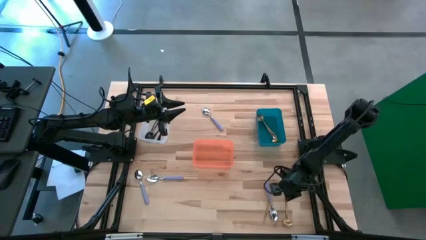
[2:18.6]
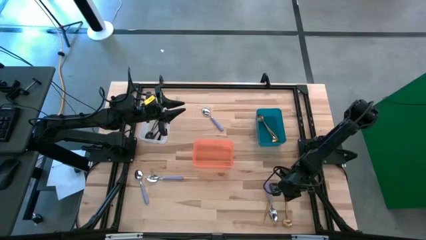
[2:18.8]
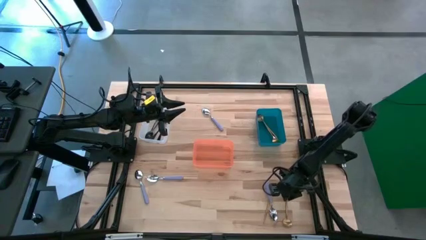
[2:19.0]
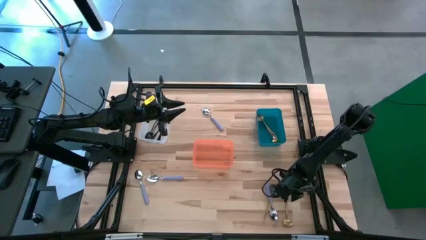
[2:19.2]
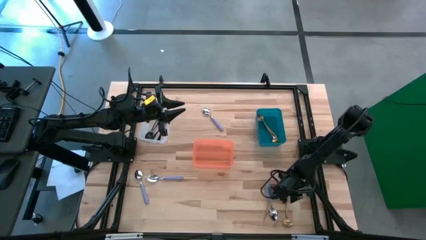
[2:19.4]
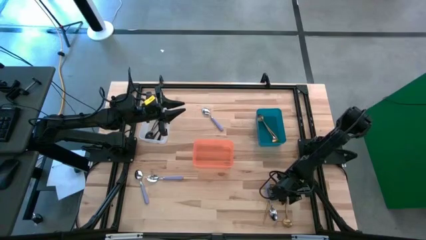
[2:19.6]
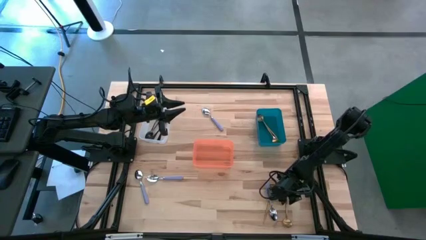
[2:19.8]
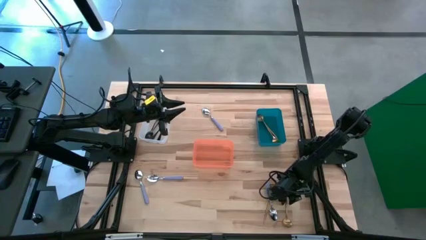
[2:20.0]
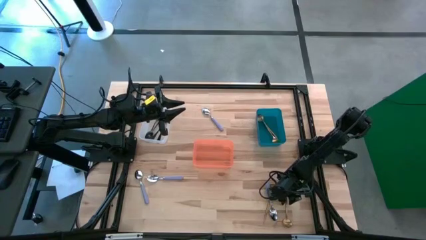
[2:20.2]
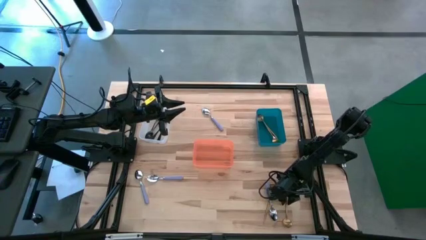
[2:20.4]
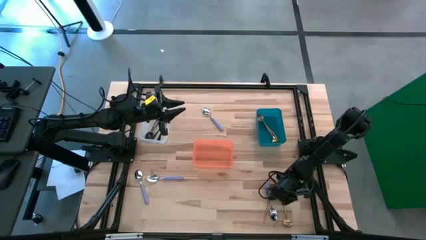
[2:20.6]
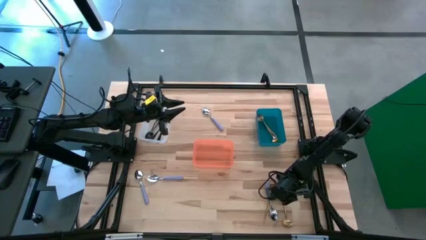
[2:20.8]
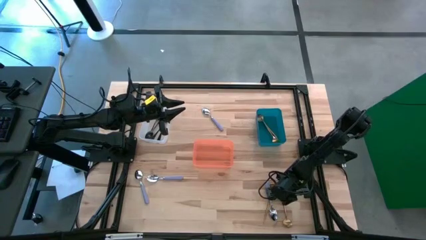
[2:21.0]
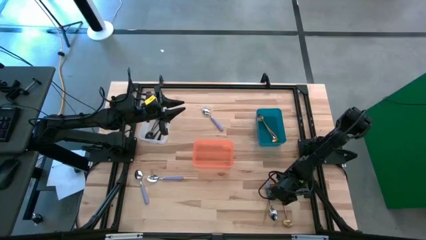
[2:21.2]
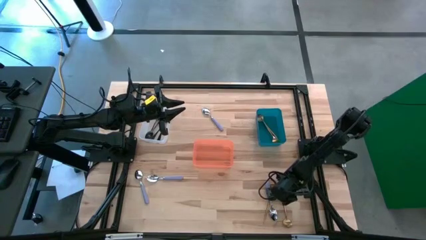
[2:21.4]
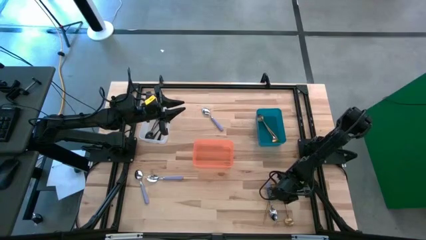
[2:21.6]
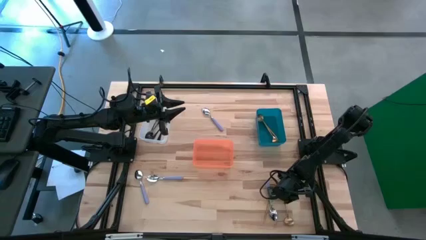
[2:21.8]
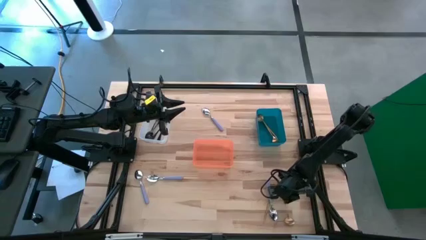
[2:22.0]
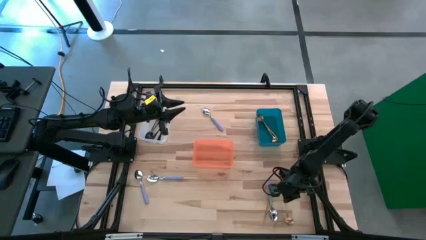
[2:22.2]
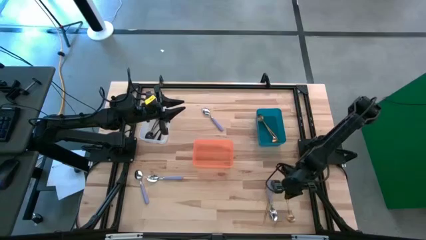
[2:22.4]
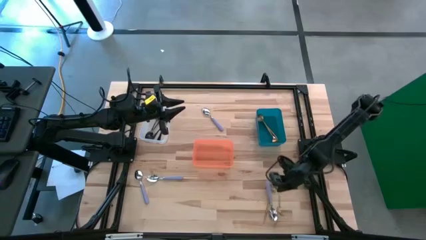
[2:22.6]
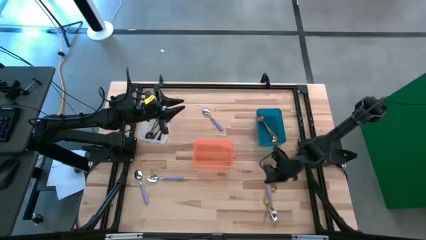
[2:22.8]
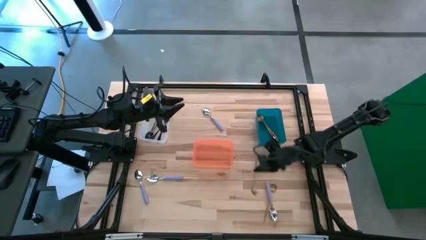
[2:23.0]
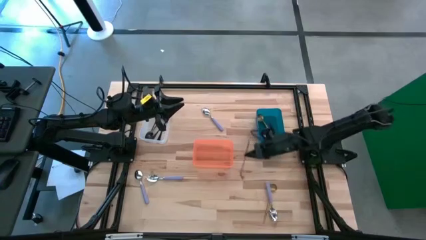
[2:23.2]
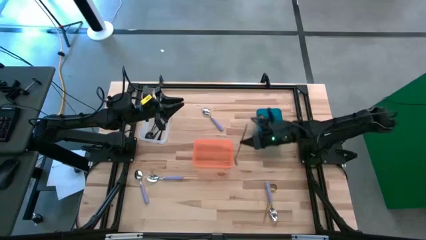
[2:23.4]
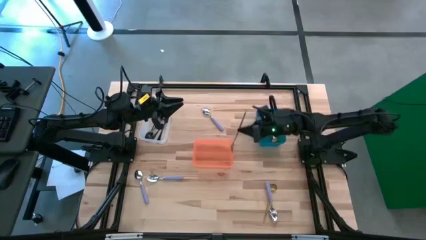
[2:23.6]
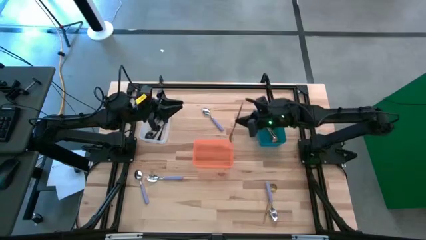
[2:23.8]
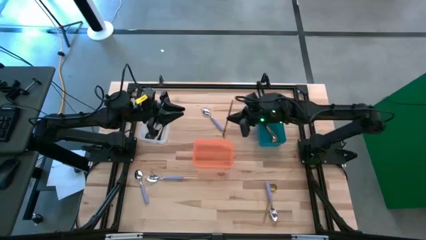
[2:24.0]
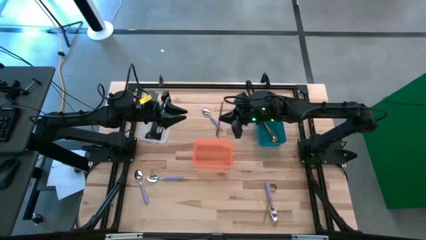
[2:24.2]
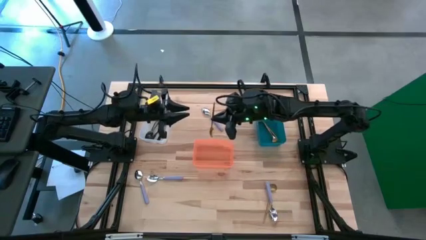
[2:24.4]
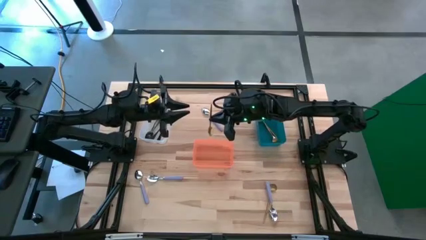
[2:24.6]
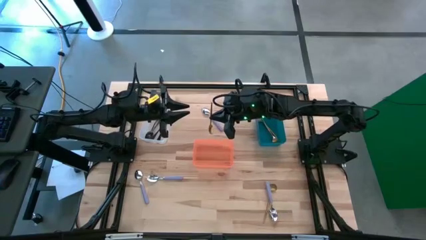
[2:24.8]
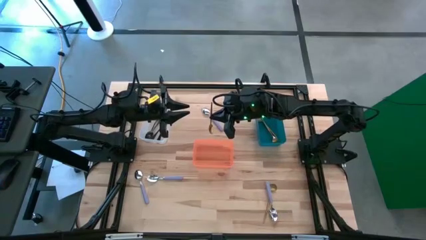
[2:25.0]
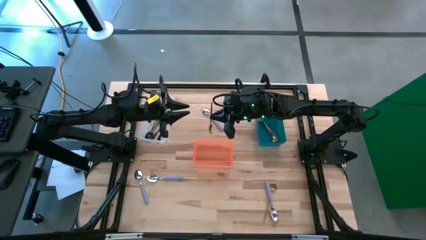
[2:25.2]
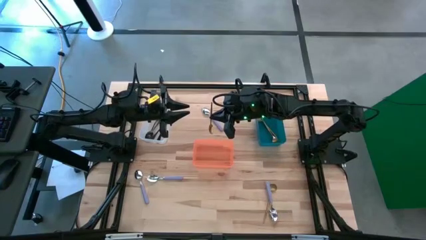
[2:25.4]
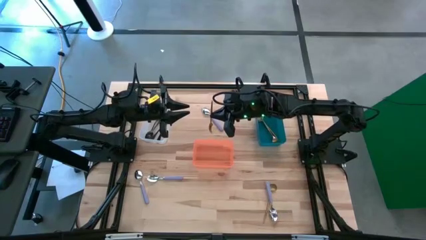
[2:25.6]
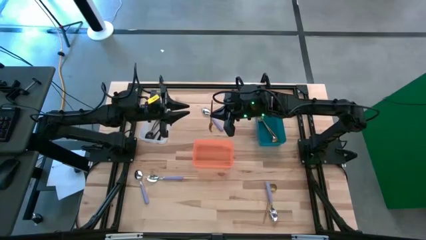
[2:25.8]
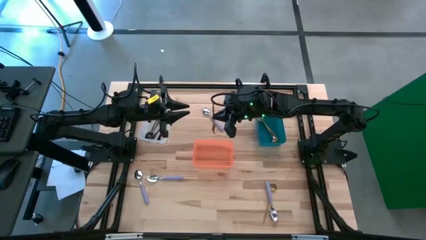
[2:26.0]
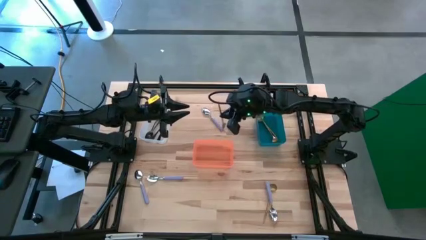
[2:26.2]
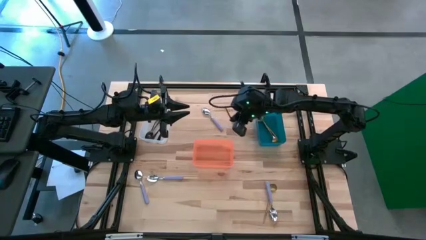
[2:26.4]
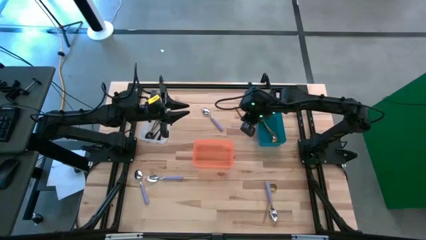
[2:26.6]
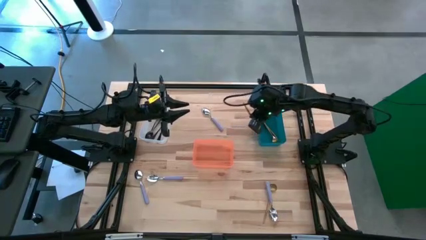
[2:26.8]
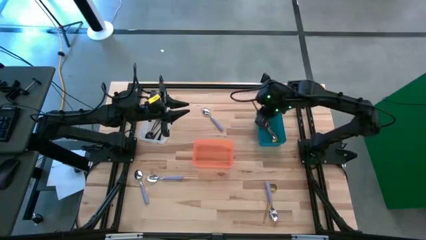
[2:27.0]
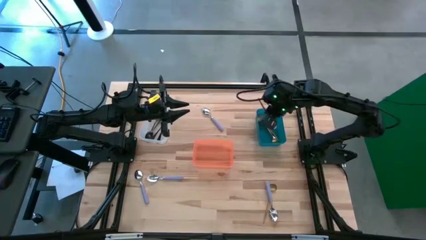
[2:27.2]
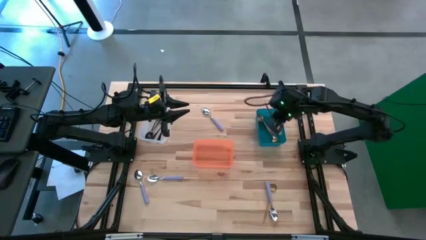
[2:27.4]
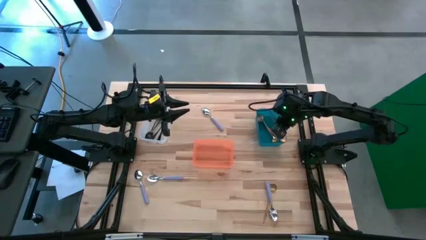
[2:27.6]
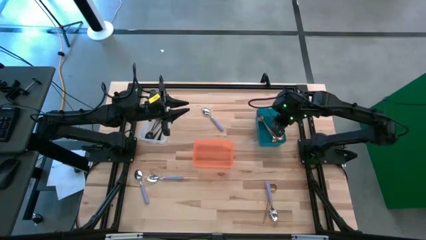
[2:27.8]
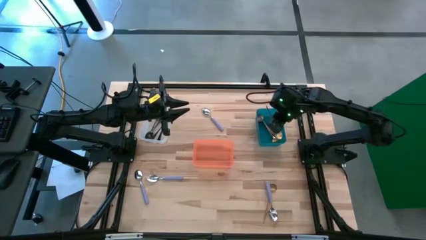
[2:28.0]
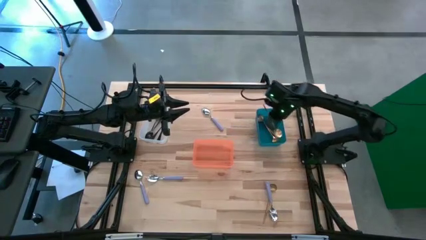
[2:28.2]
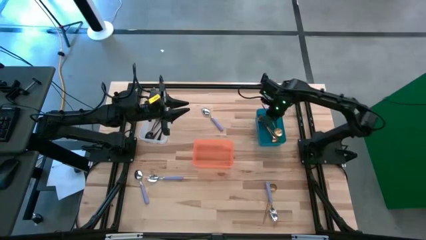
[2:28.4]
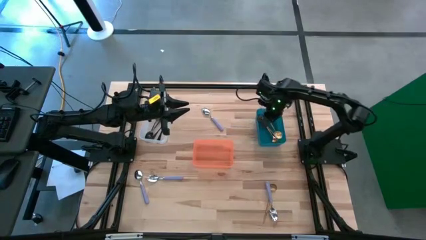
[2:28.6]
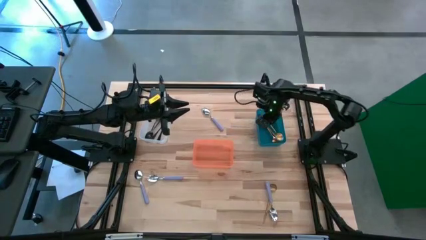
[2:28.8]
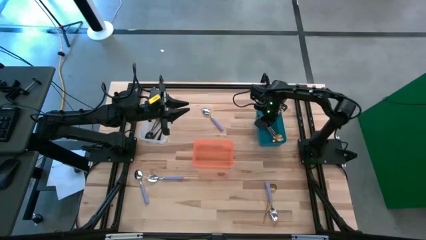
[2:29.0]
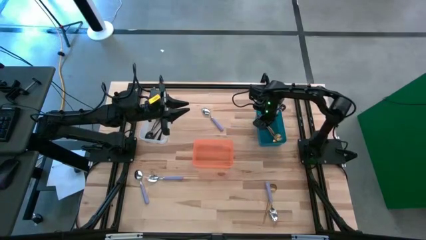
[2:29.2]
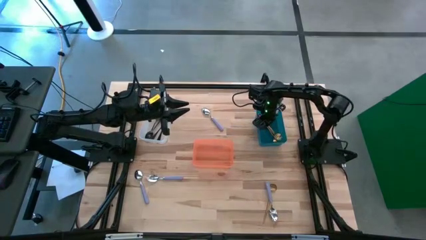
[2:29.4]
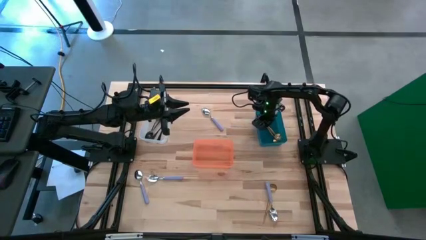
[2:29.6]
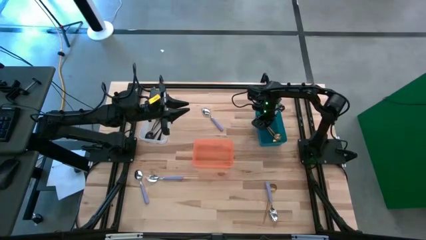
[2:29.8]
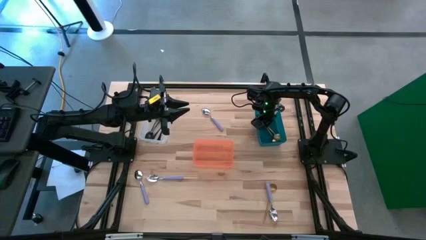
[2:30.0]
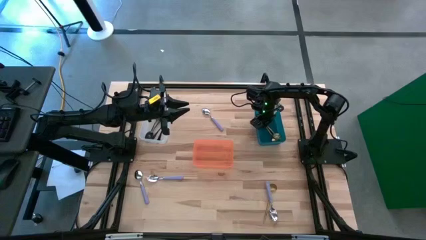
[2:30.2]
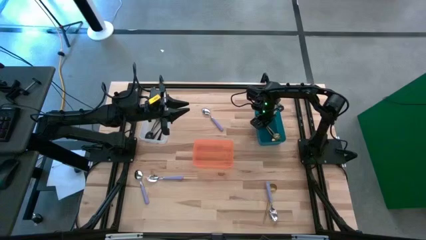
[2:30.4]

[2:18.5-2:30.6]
Task: Sort silverware by color (type)
Put the right gold spoon into the blue bin

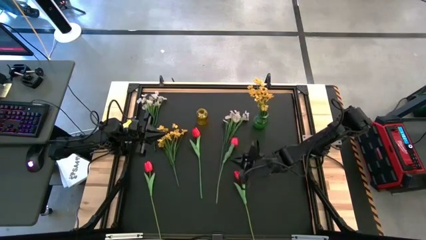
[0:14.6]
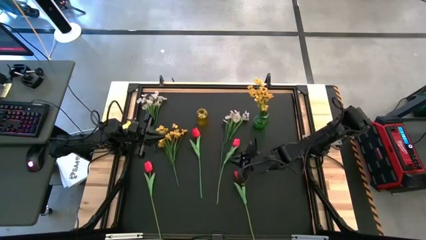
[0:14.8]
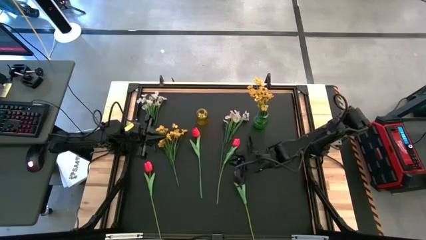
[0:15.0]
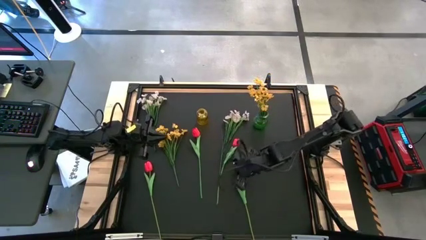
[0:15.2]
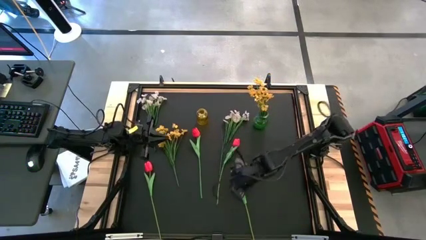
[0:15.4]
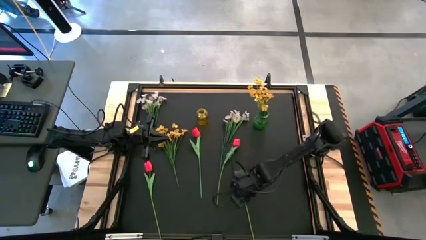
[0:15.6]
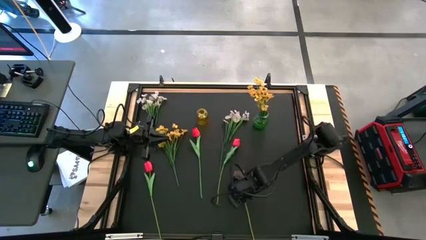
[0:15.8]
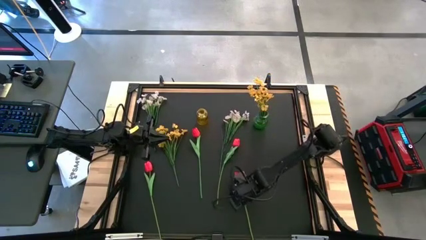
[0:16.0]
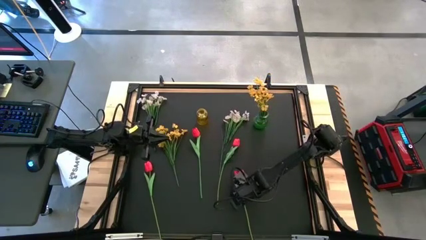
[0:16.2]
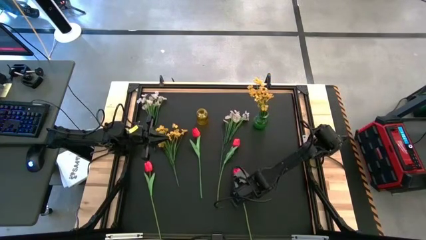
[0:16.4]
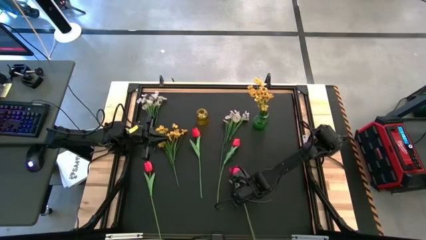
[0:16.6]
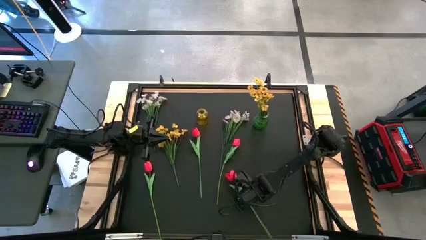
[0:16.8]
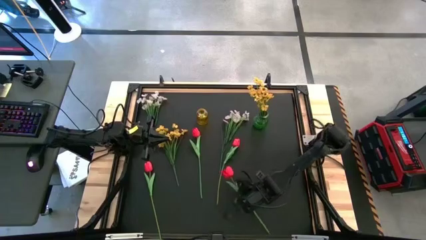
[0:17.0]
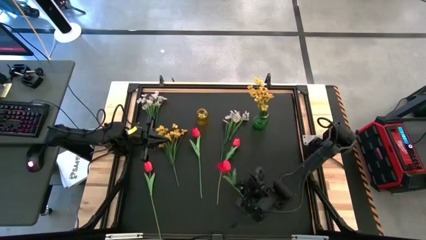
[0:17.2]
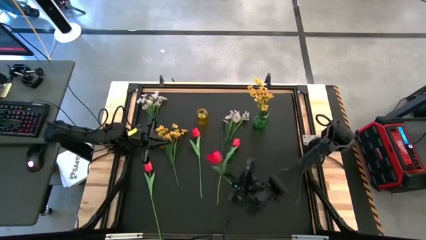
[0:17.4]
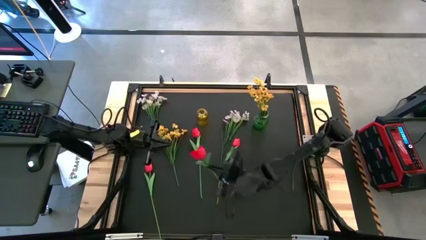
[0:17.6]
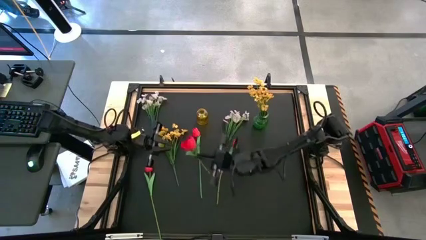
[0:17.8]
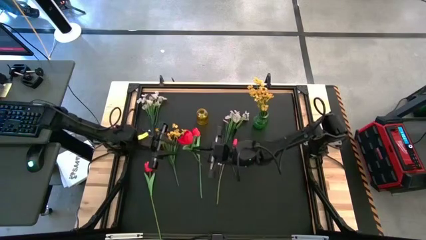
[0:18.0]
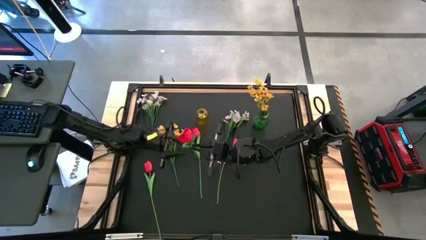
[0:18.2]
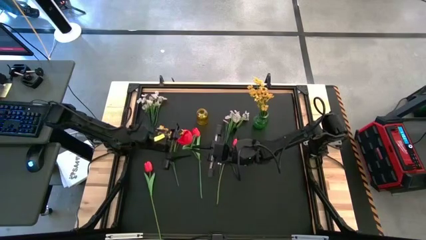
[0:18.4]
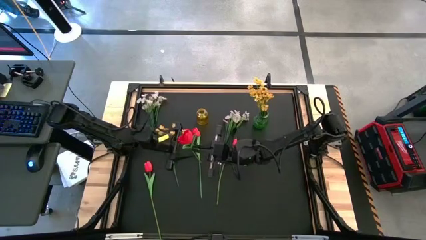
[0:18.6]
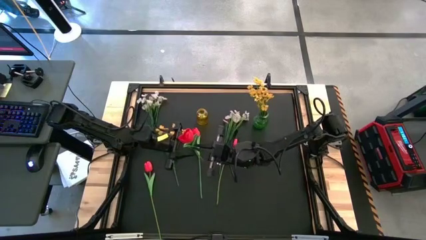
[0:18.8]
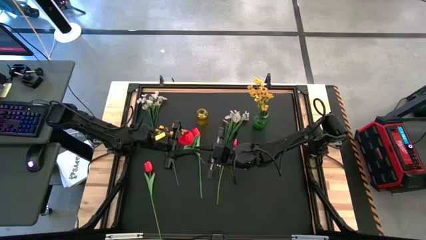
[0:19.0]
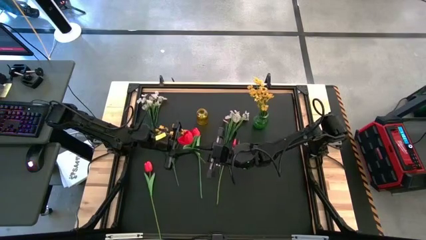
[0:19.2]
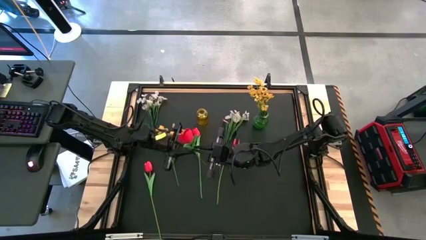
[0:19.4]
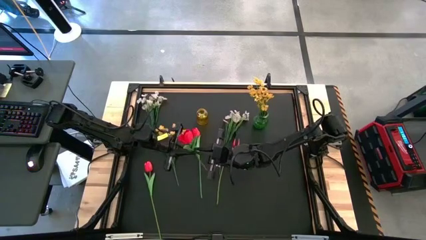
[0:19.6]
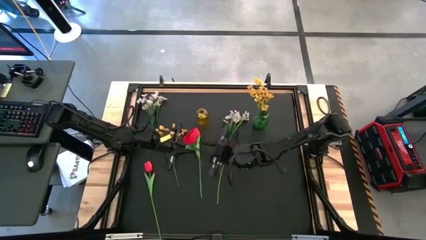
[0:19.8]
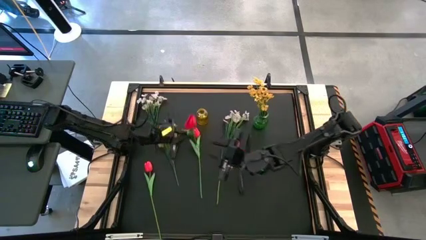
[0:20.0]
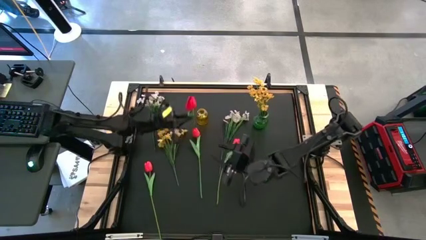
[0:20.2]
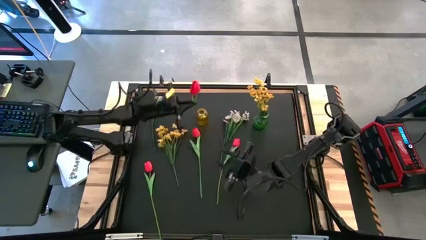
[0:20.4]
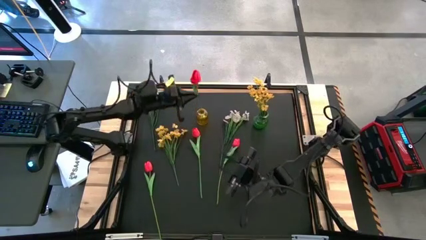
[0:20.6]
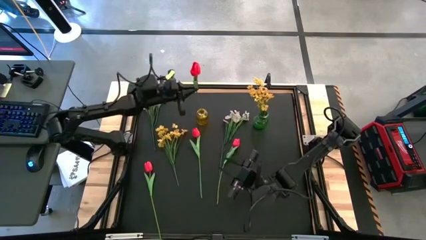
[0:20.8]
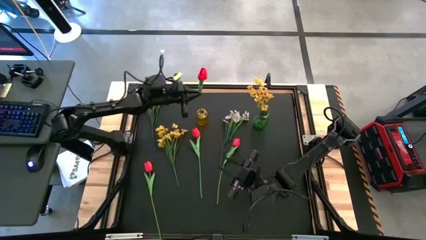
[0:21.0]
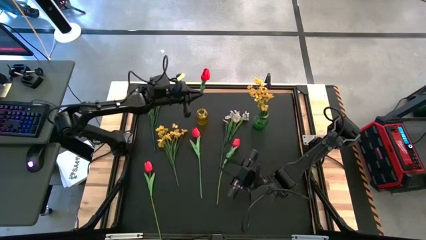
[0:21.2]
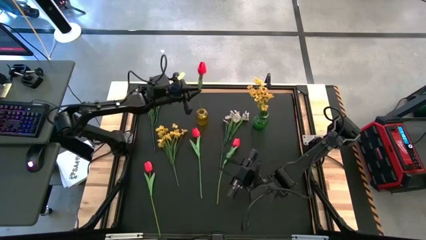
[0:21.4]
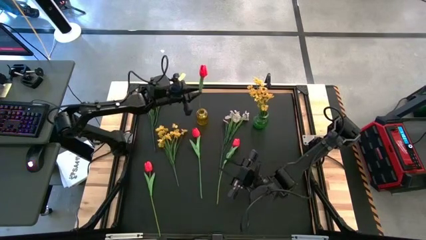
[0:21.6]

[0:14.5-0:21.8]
Task: Sort flowers into vase by color
Put the red tulip into the yellow vase
